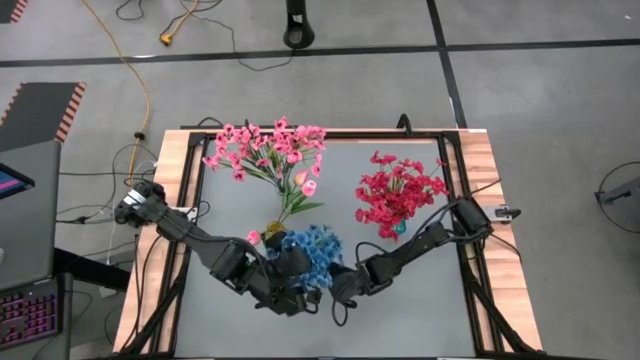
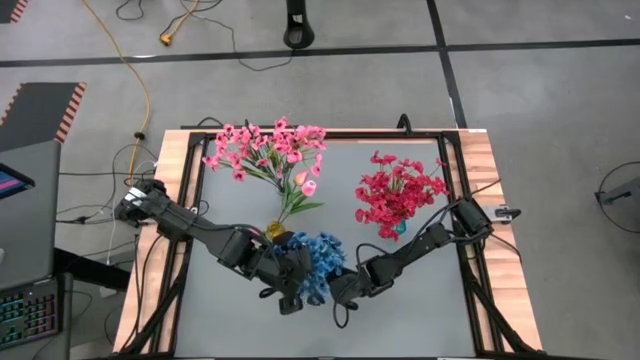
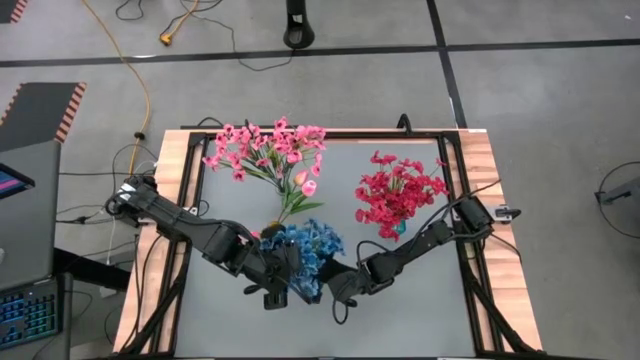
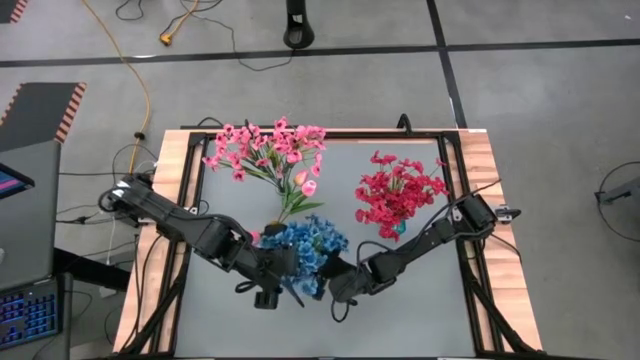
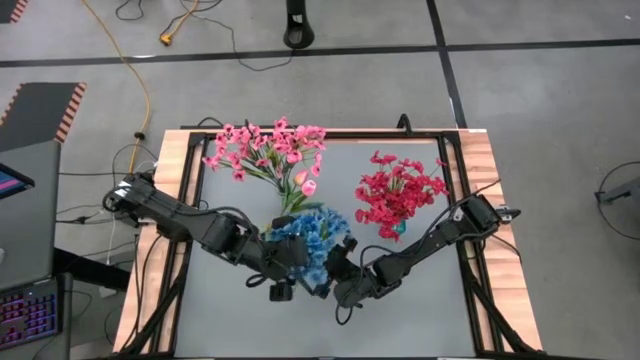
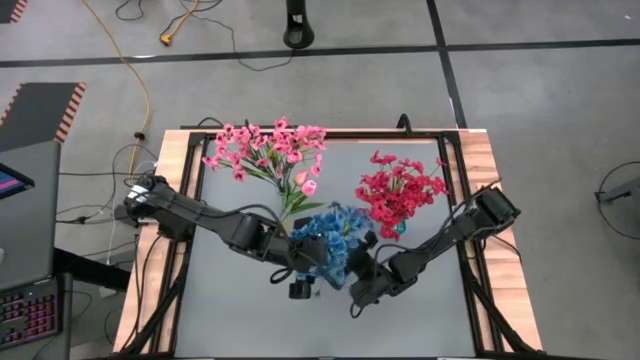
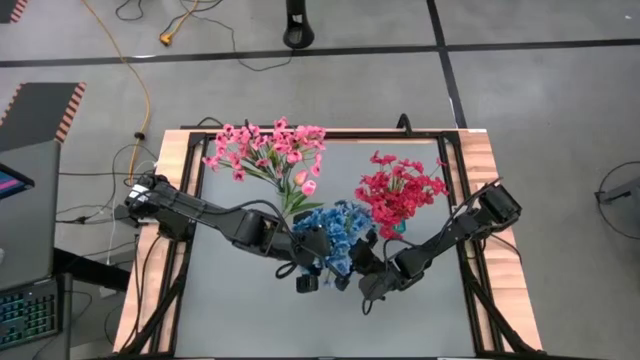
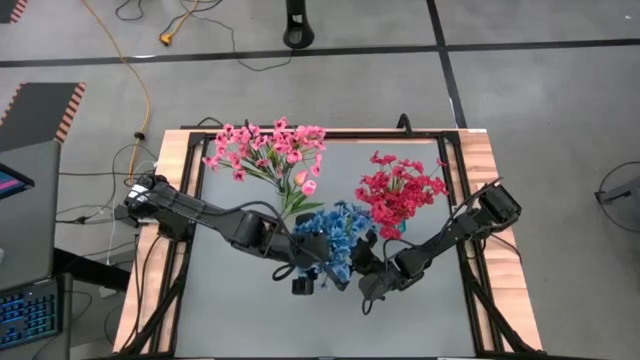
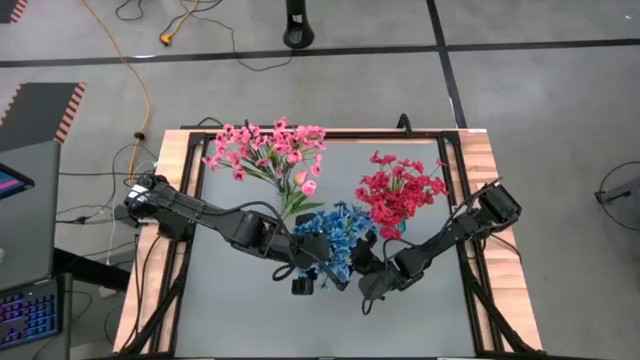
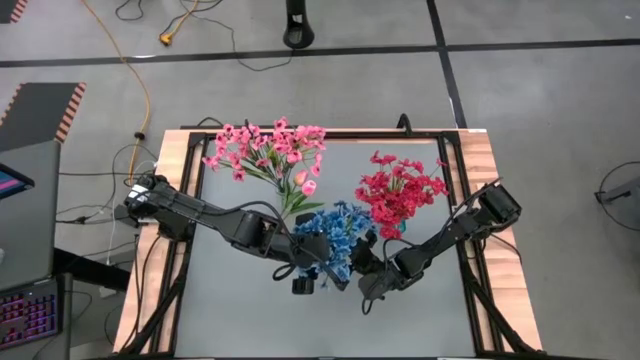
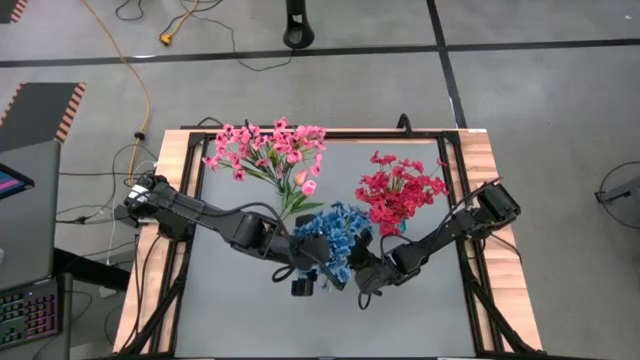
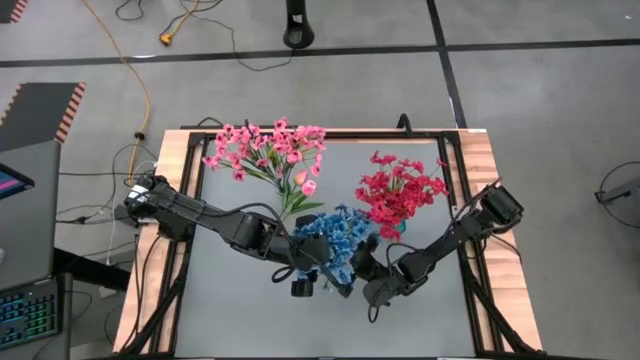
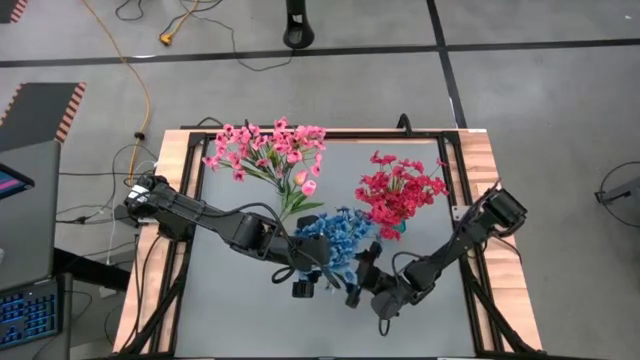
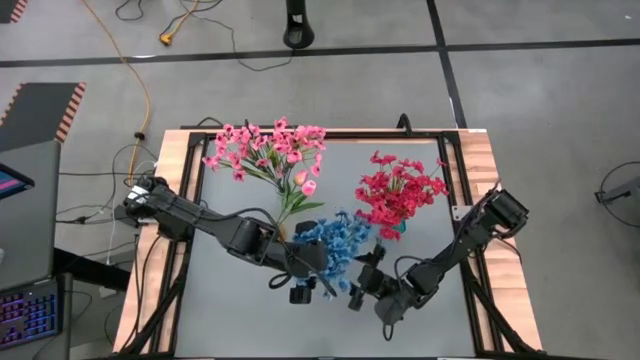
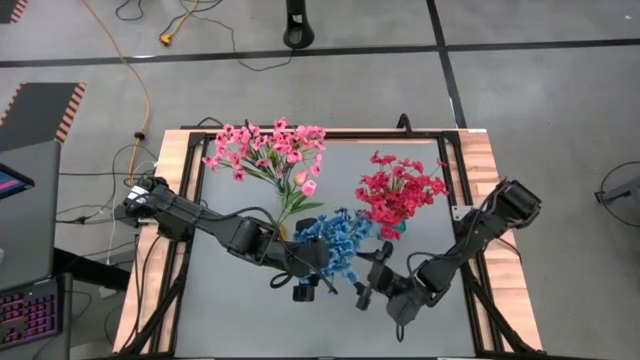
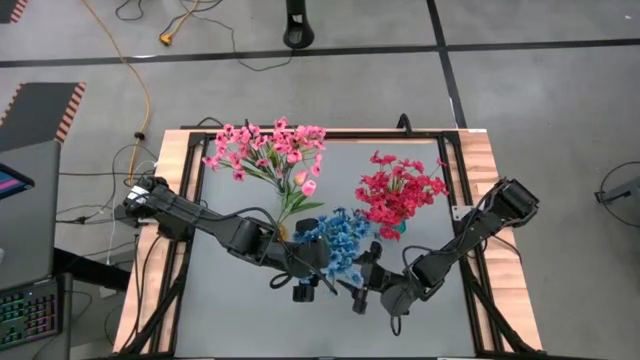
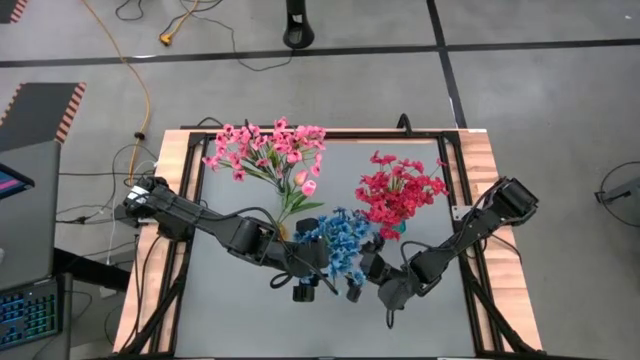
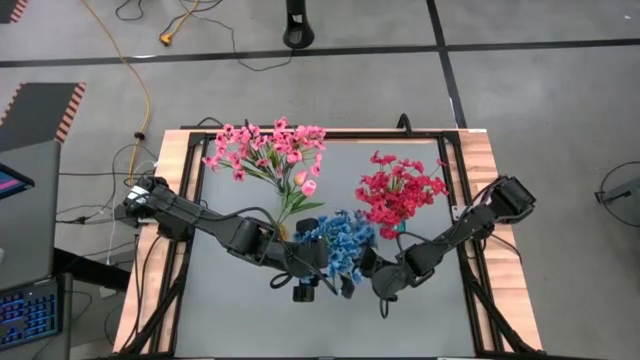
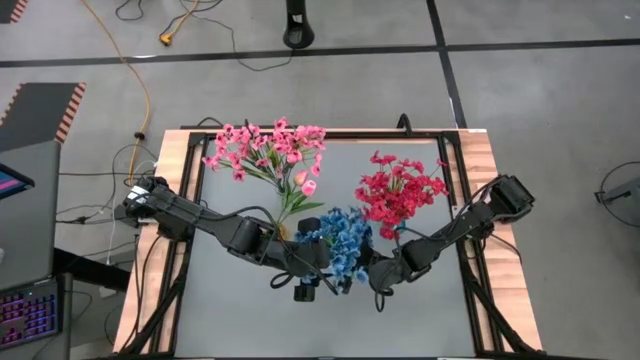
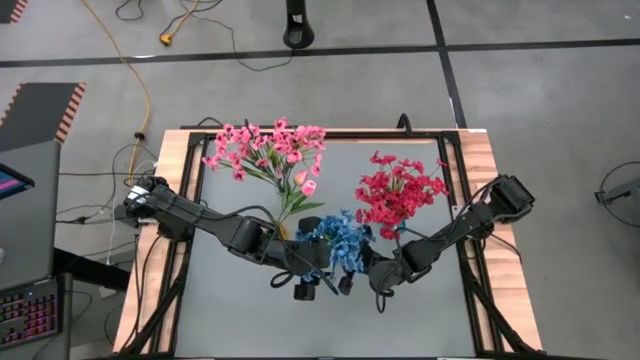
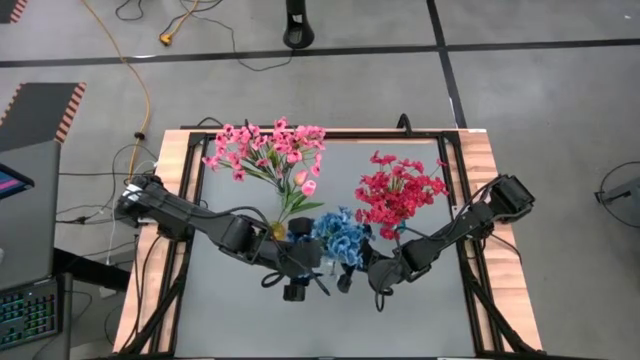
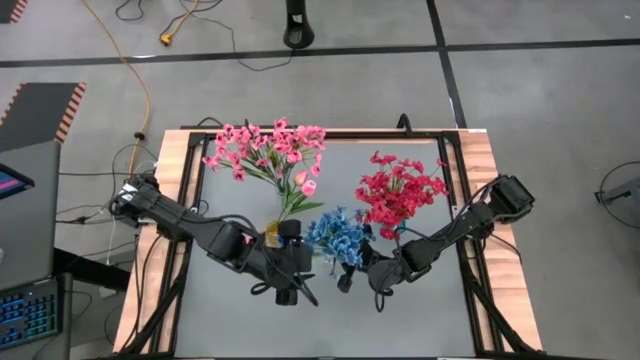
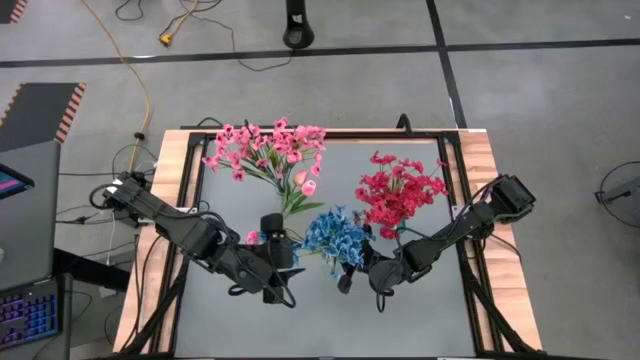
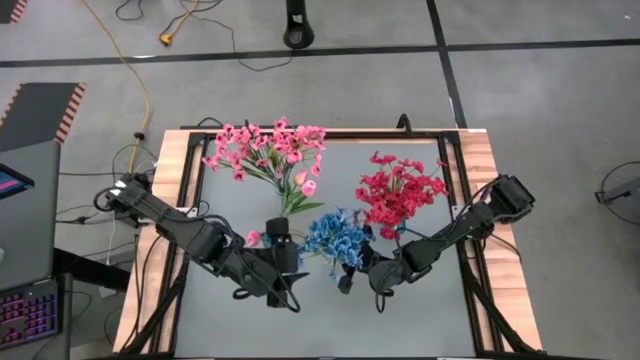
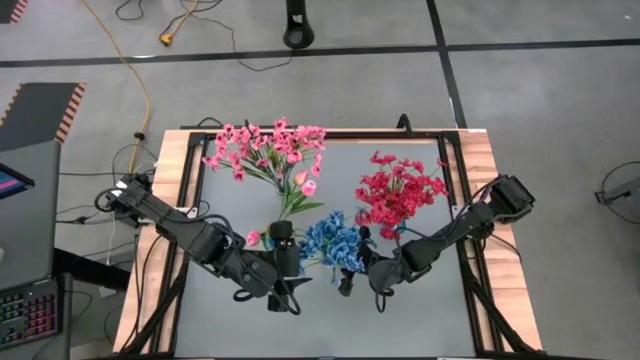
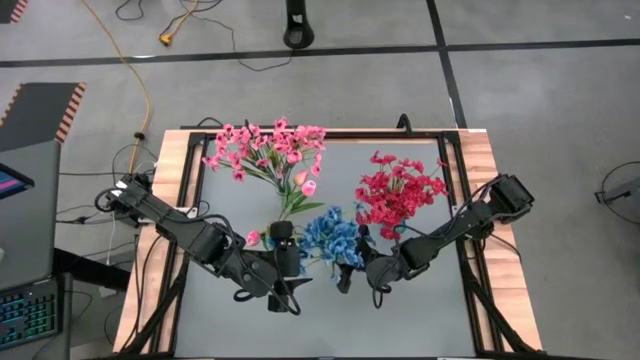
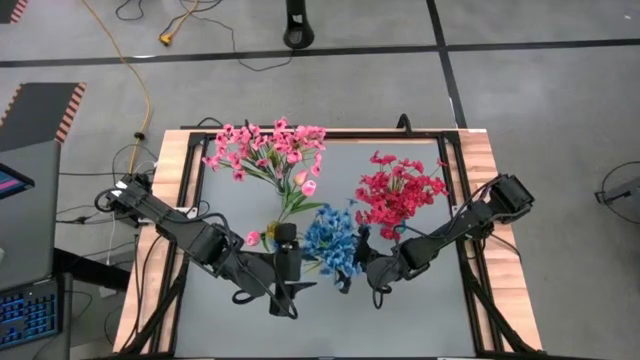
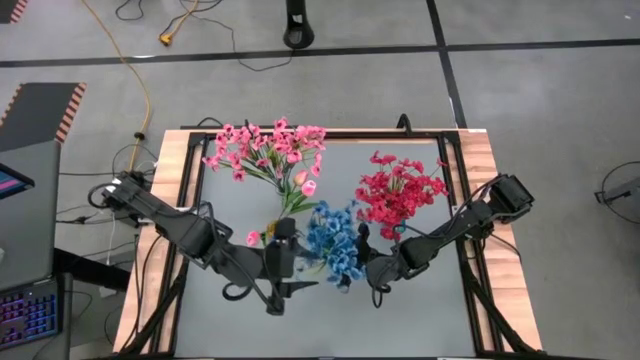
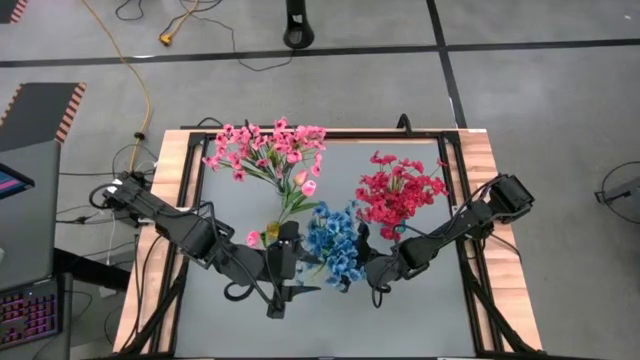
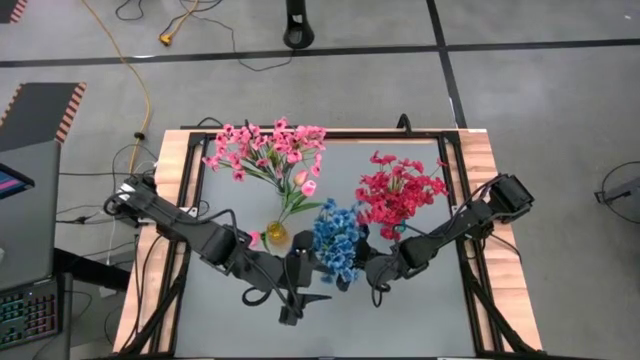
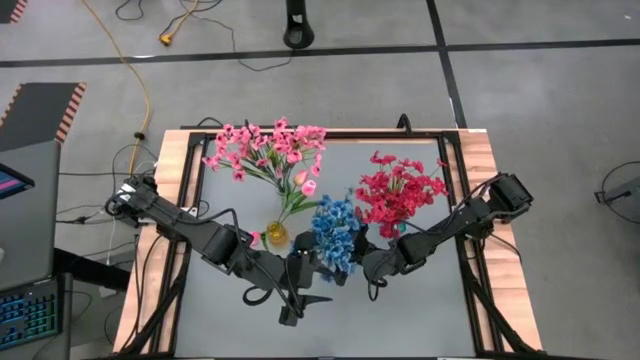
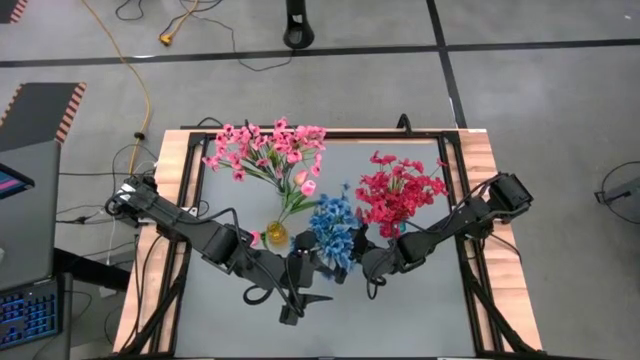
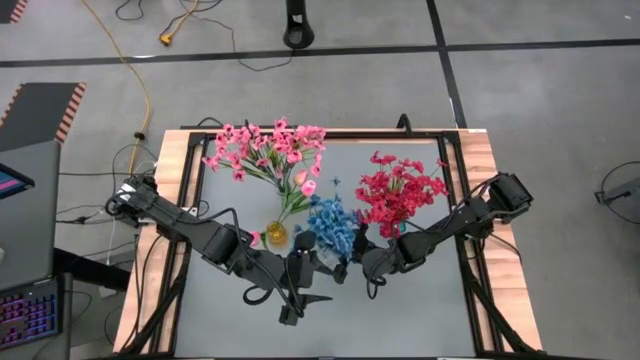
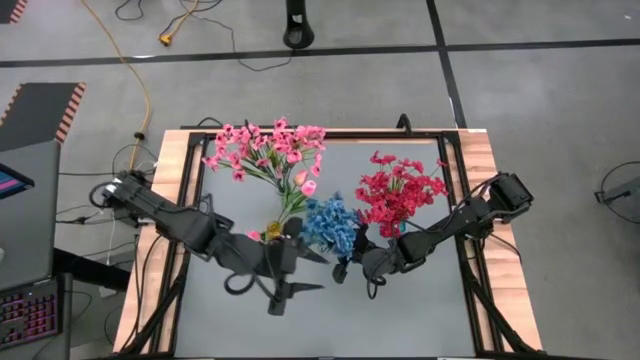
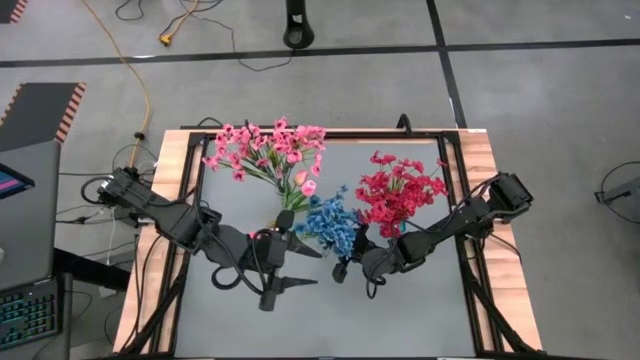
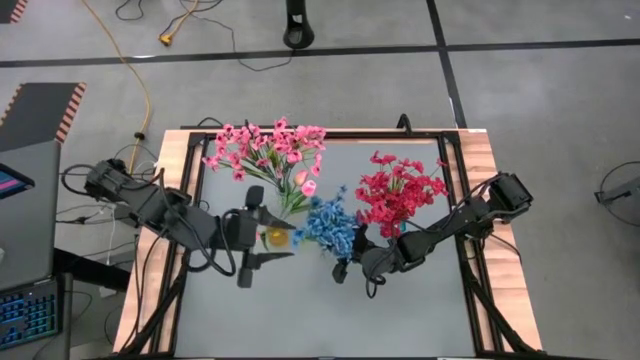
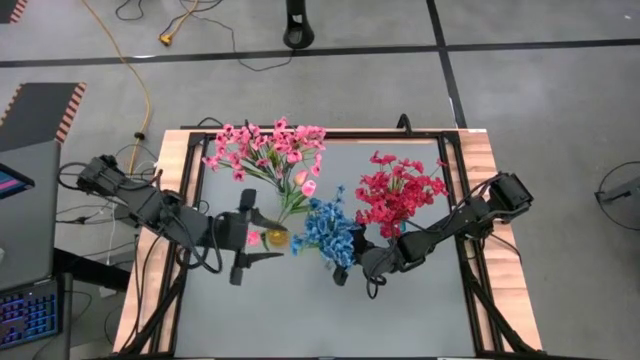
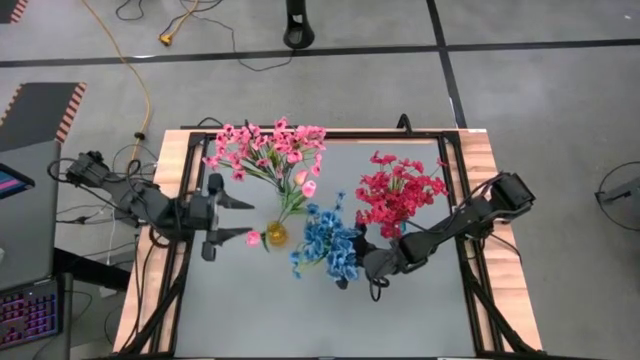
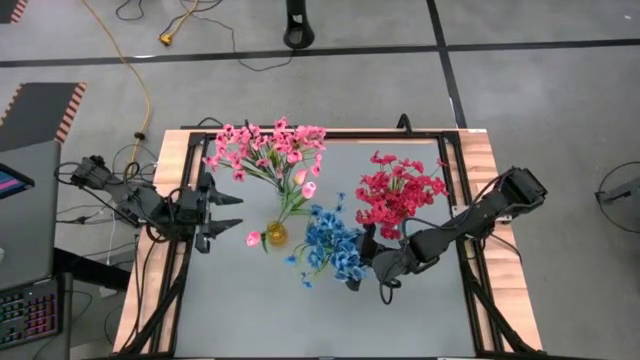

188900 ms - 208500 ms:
Task: Sort flowers into vase by color
Adjust the blue flowers in the bottom transparent vase

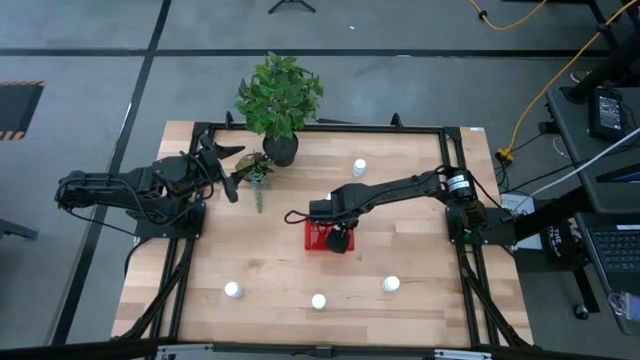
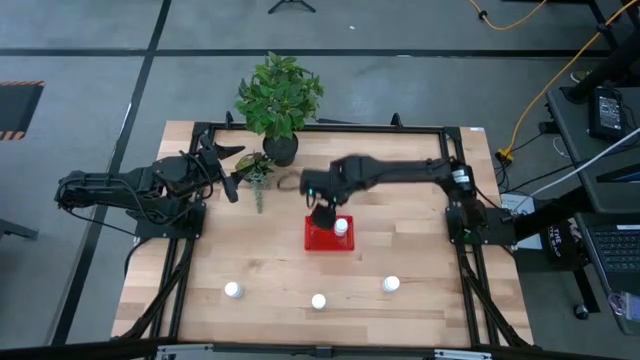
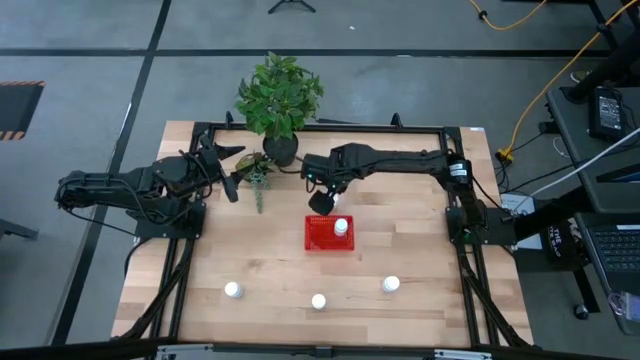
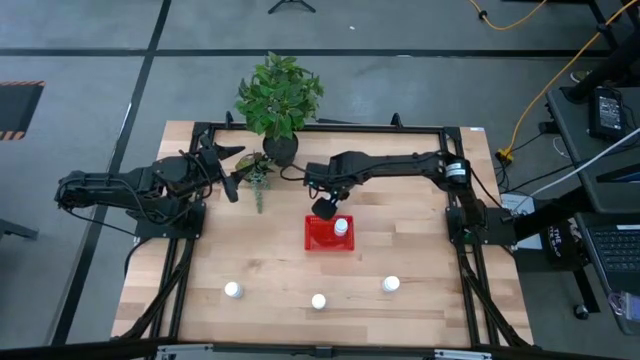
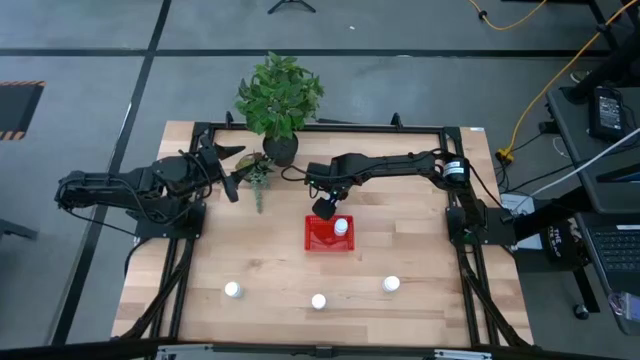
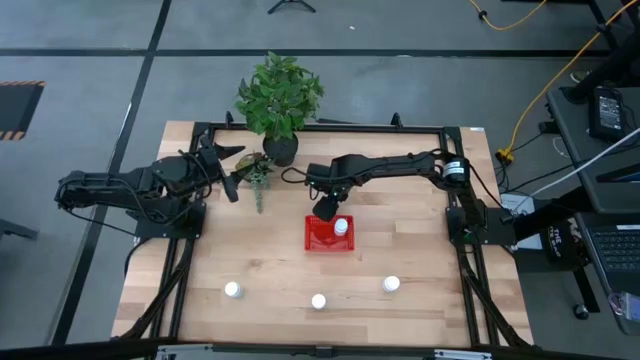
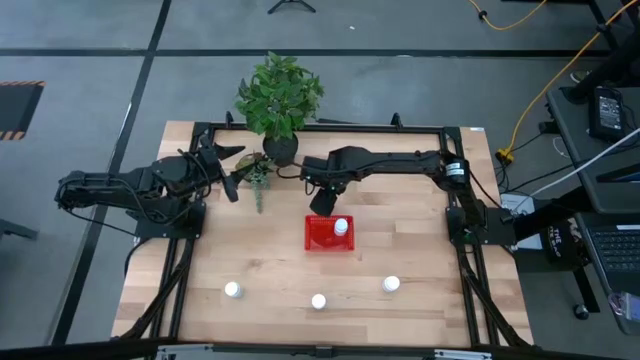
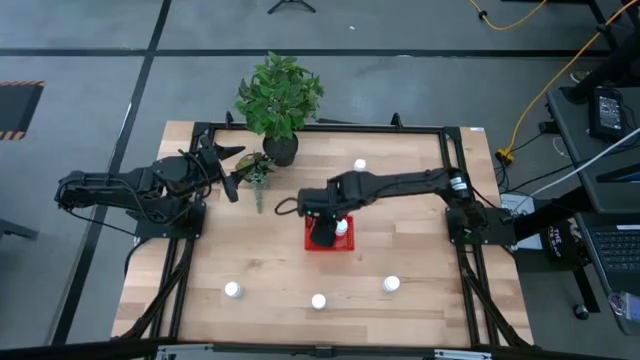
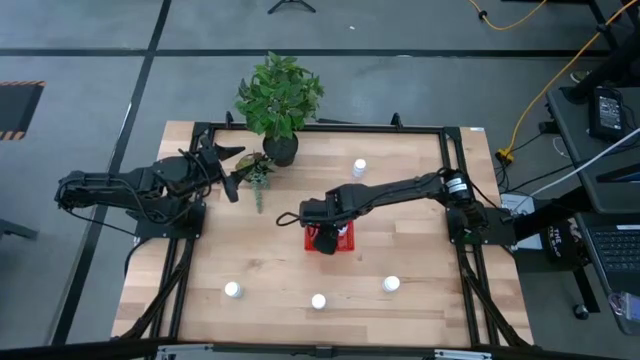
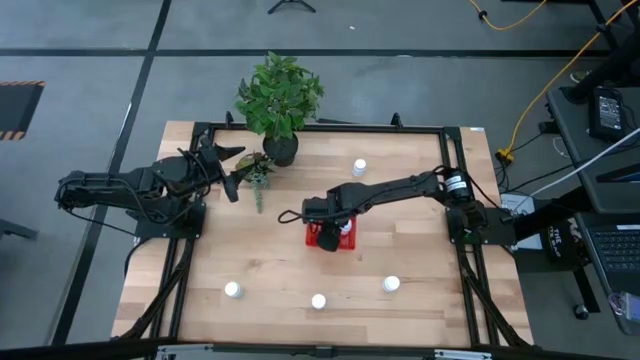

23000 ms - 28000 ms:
Task: Pick and place pill bottles into a basket
Put the white medicine bottle into the red basket
